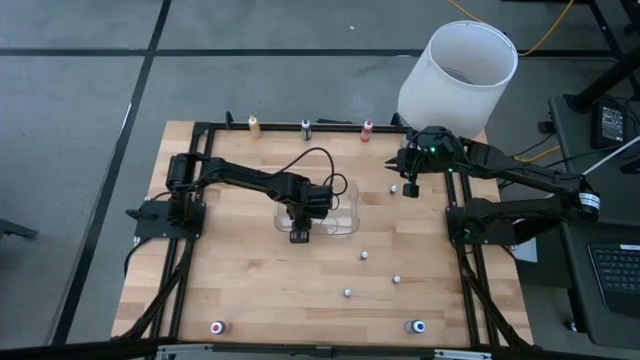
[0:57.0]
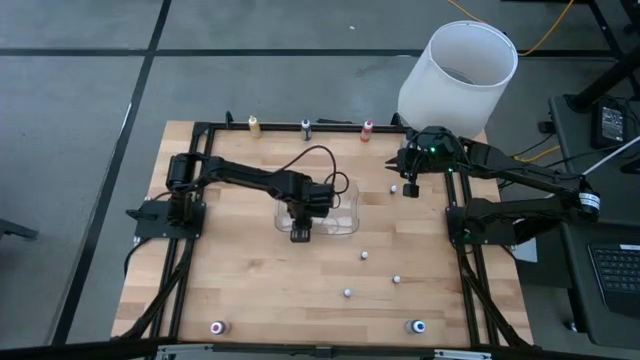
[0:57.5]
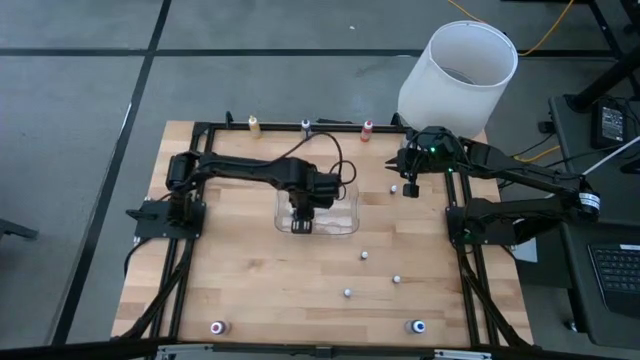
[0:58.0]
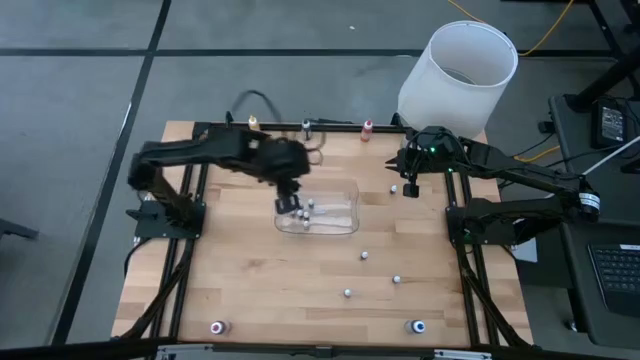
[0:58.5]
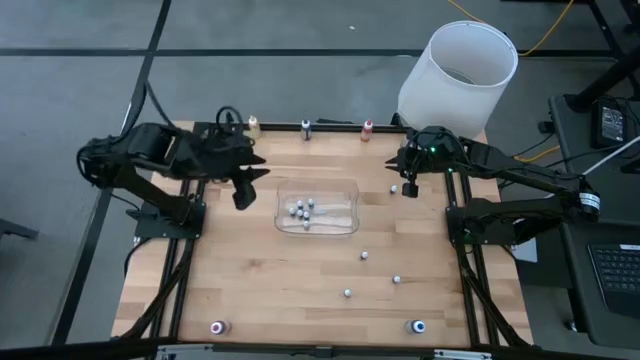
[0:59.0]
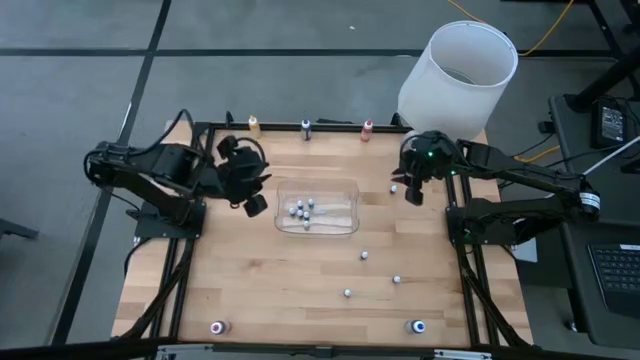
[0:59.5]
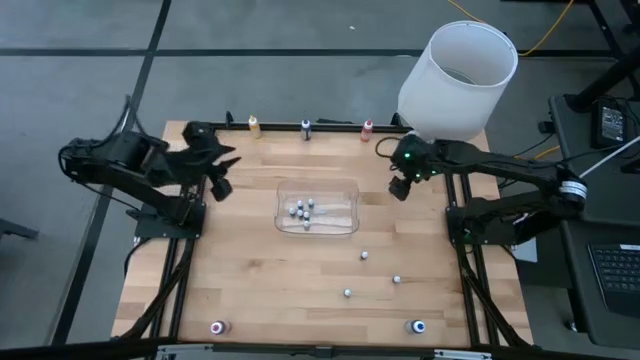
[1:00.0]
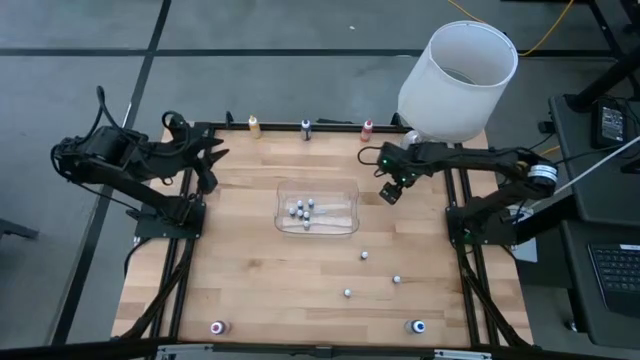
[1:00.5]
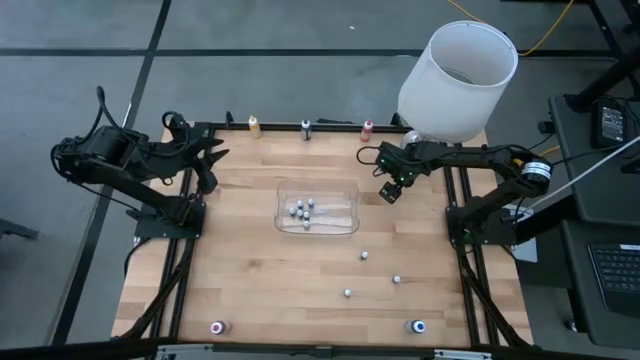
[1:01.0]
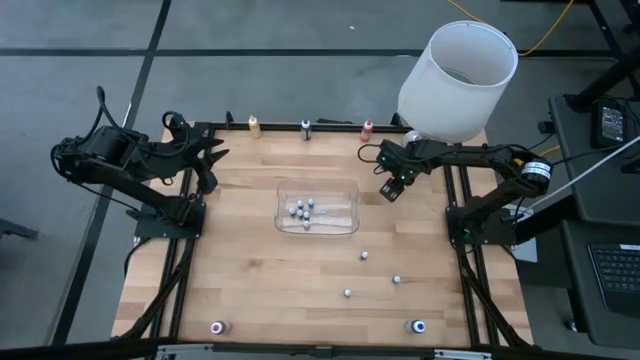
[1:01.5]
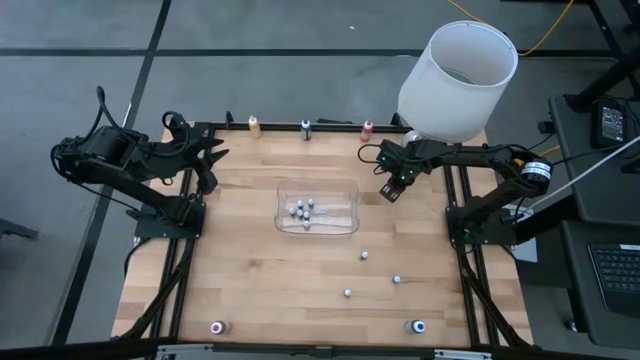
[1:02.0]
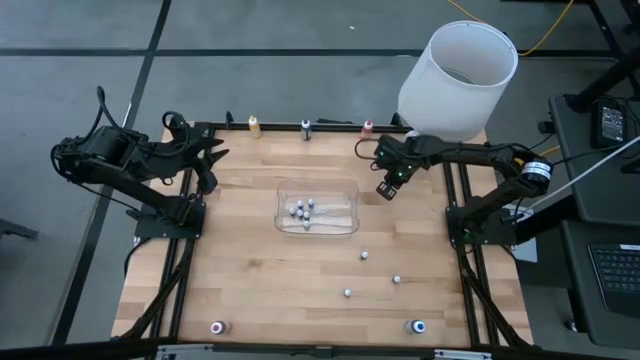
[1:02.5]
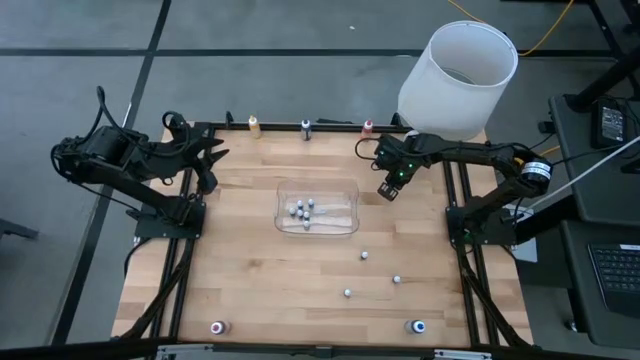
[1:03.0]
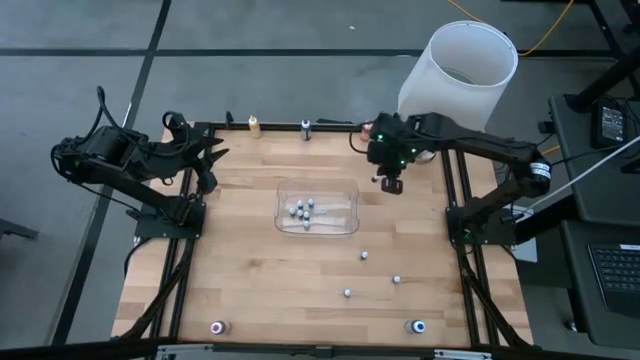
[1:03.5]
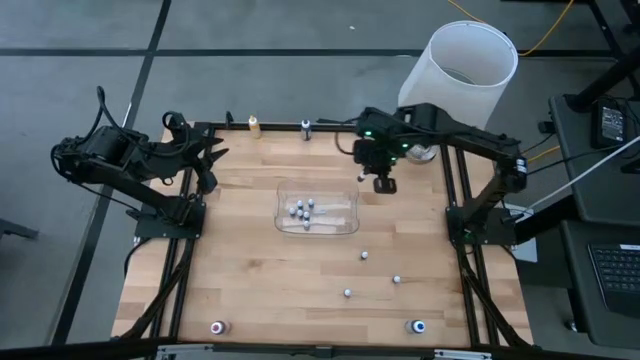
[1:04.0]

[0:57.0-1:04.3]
Task: Pick & Place food coloring
Put the pink food coloring bottle into the transparent bin

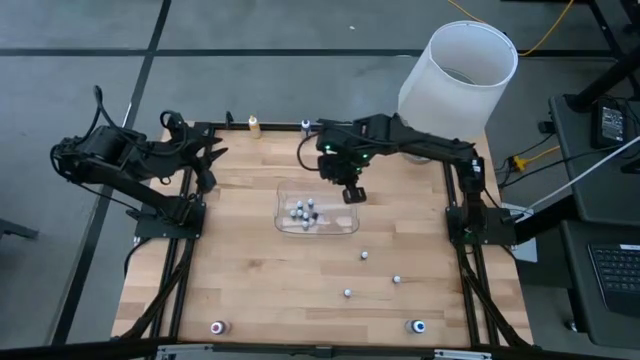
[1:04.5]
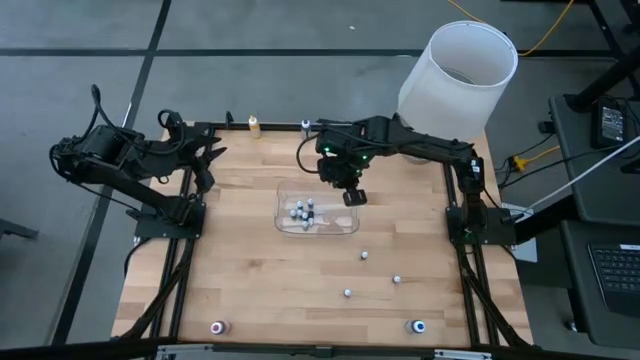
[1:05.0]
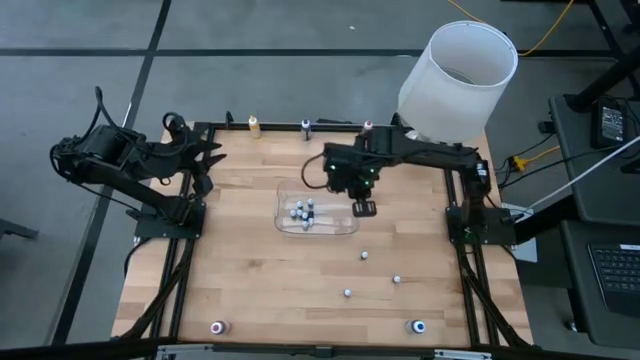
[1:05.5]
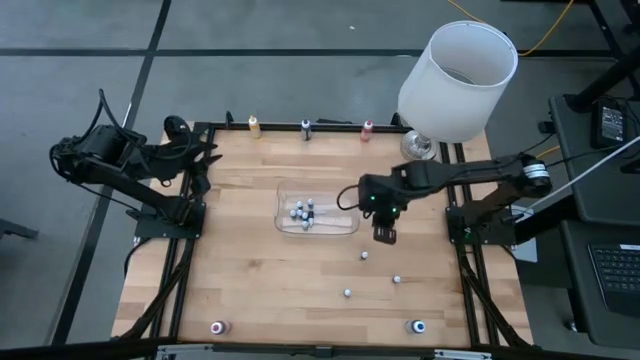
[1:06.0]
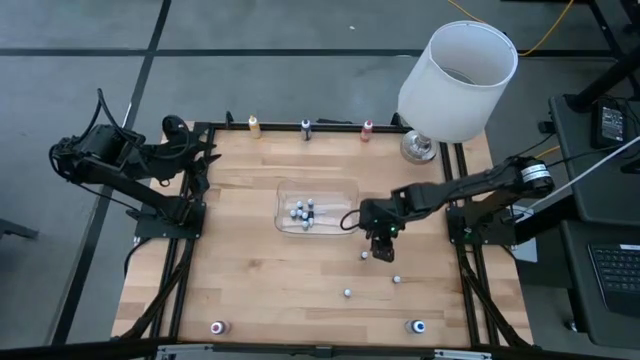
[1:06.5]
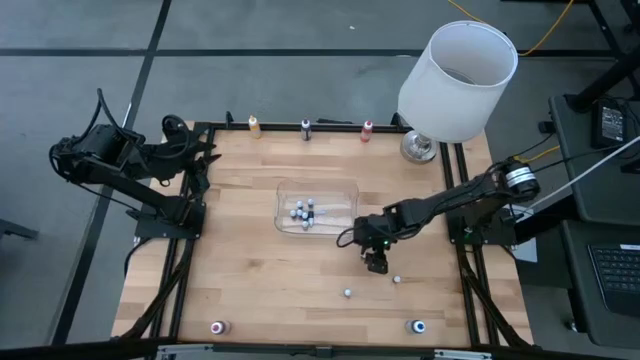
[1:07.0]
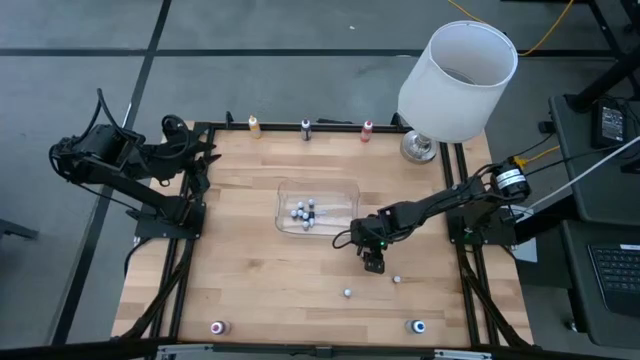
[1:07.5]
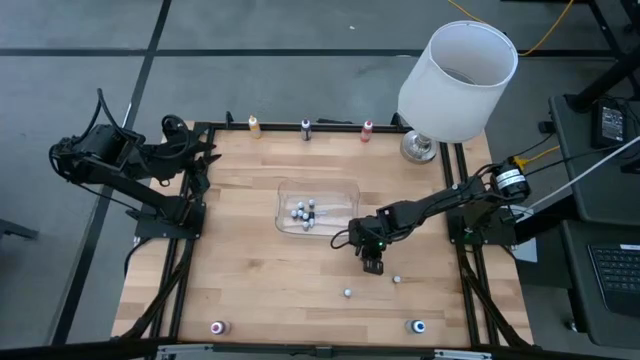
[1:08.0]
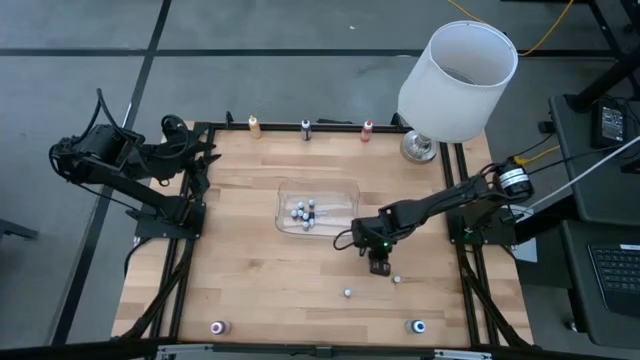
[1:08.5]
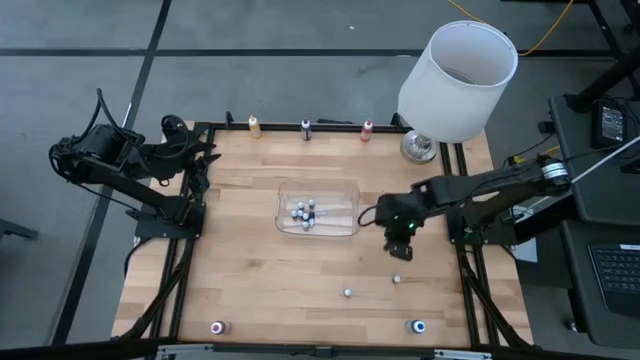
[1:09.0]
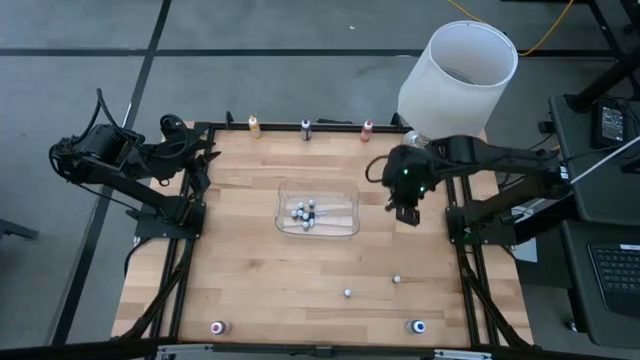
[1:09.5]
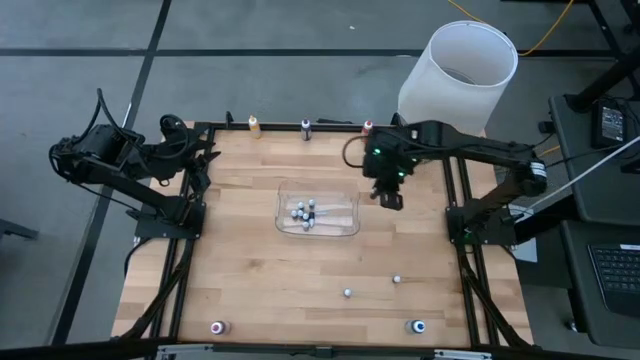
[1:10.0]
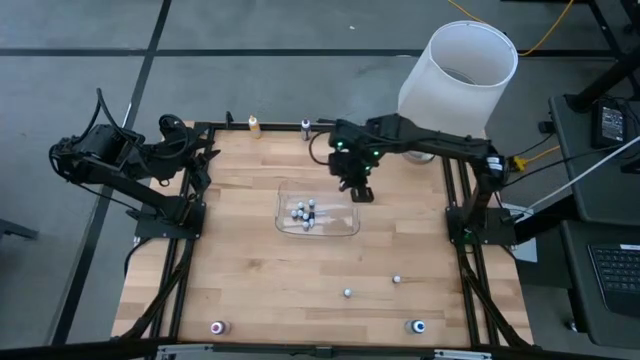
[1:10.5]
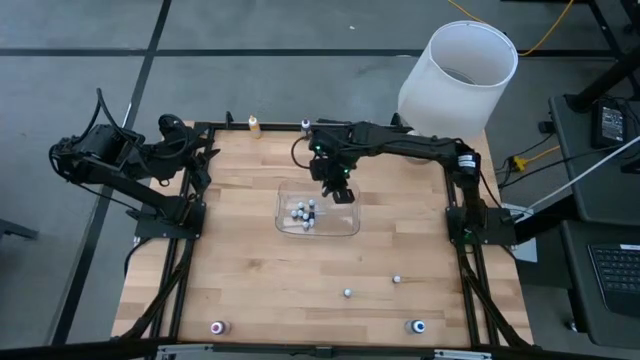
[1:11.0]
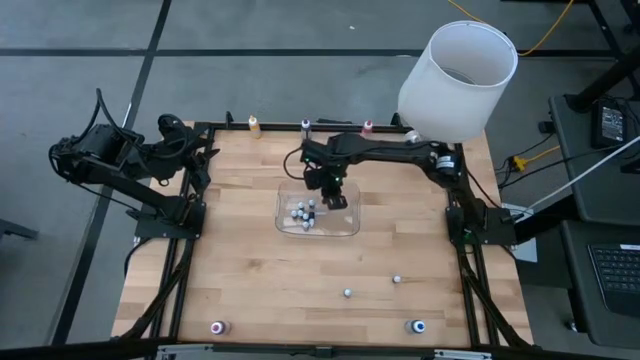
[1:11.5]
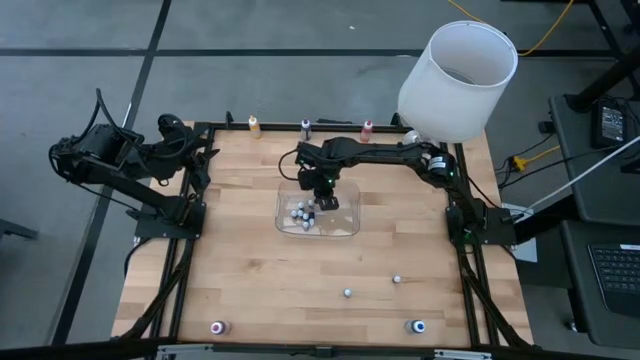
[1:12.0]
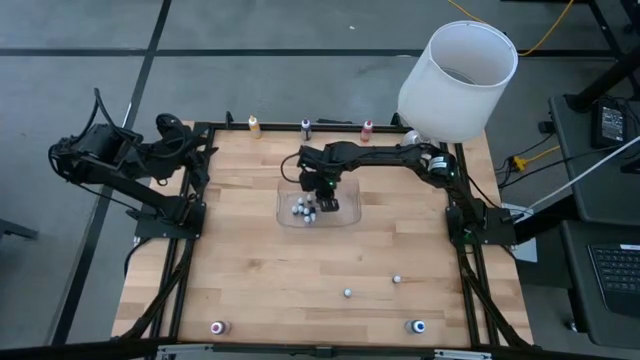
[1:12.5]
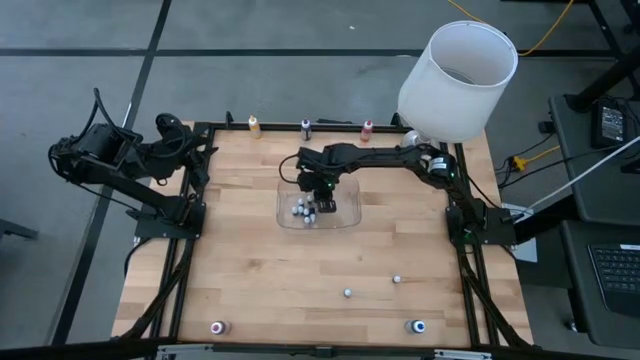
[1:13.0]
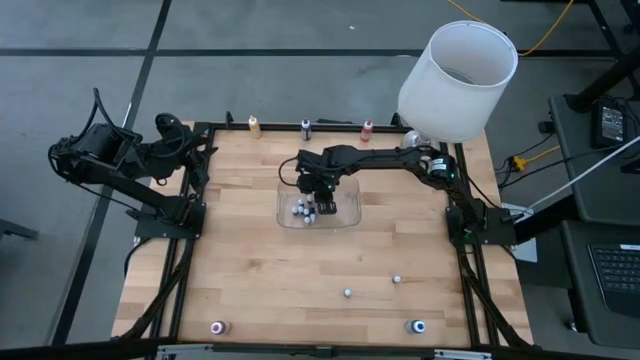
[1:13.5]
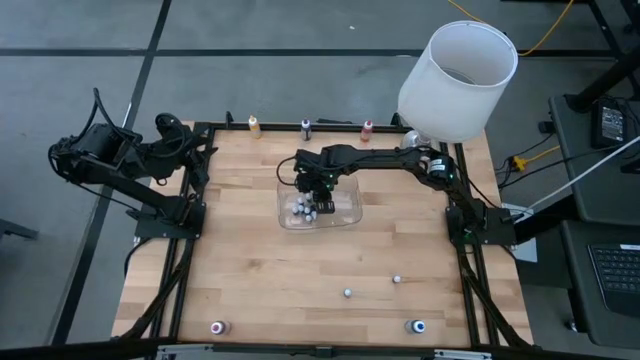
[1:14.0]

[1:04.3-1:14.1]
Put the red food coloring bottle into the transparent bin

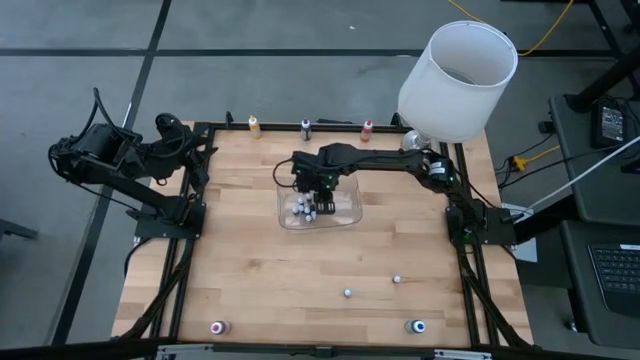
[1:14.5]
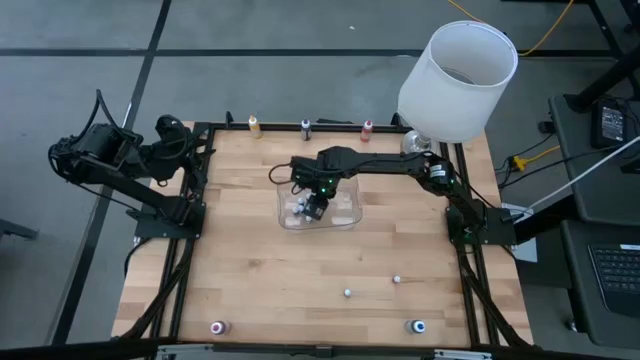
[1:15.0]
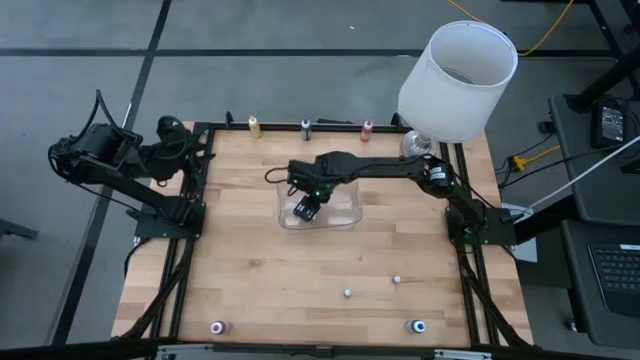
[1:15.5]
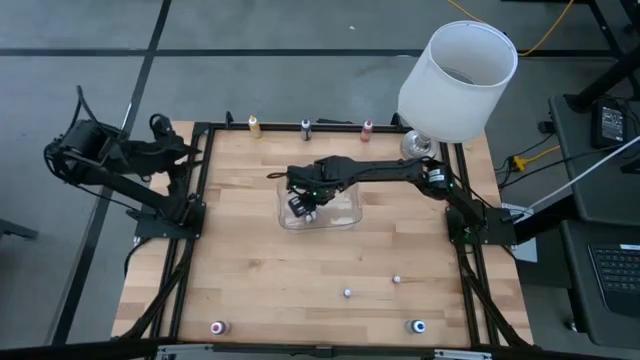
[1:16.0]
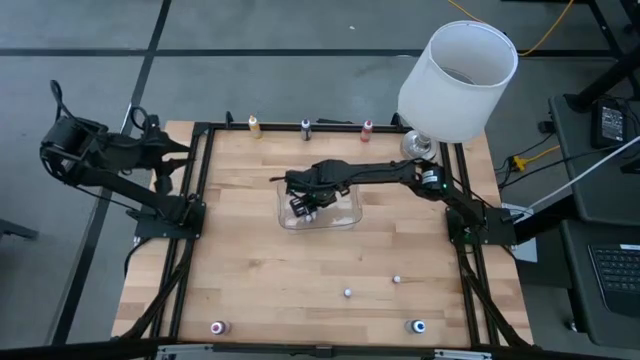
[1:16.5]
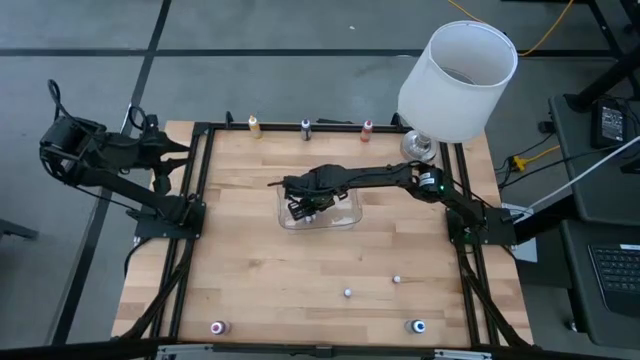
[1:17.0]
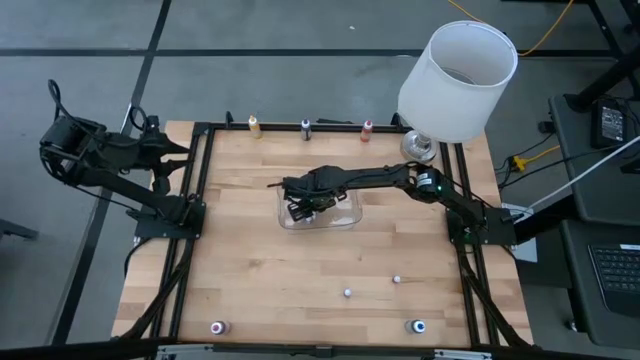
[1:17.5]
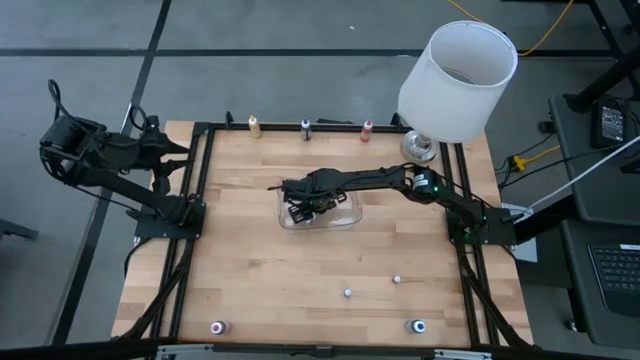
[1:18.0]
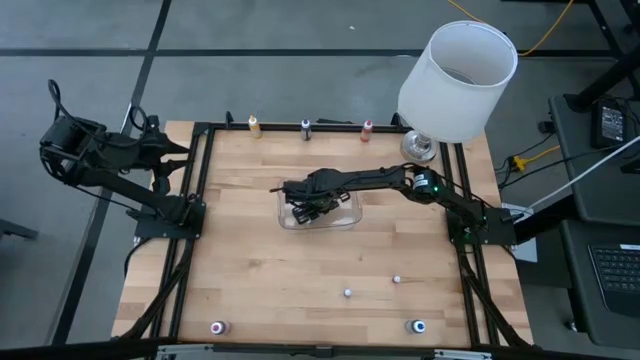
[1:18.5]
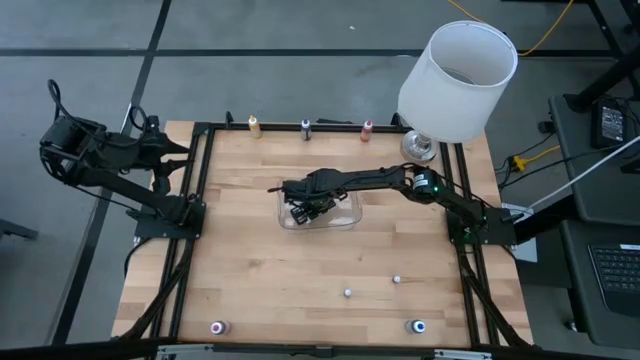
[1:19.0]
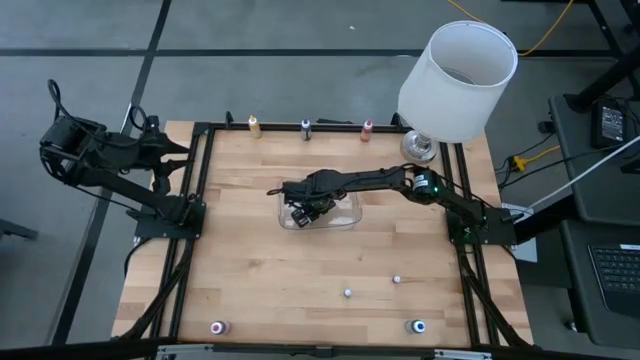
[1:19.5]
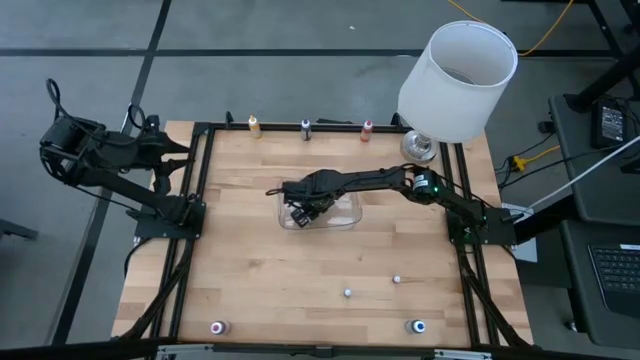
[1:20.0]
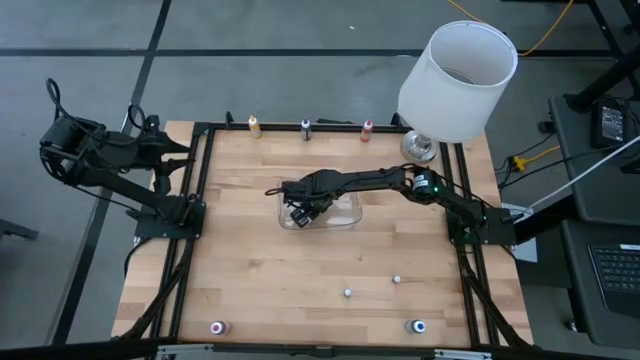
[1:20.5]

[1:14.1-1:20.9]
Put the pink food coloring bottle into the transparent bin
